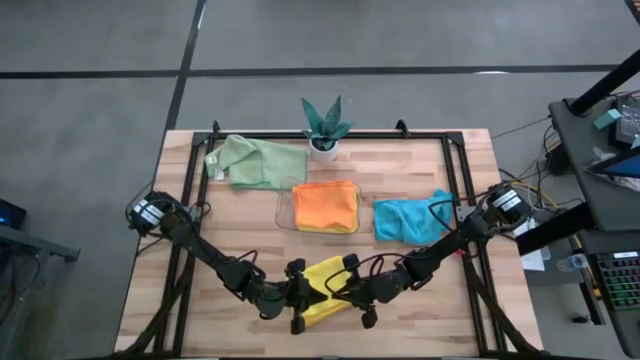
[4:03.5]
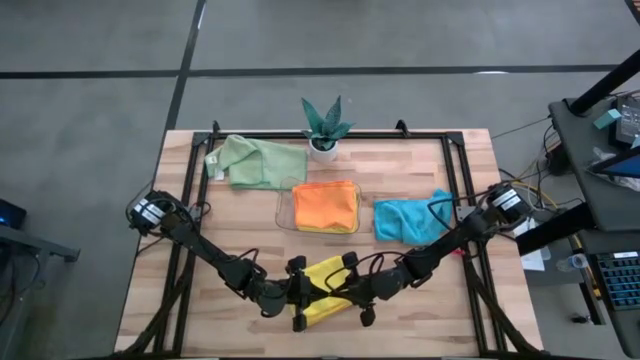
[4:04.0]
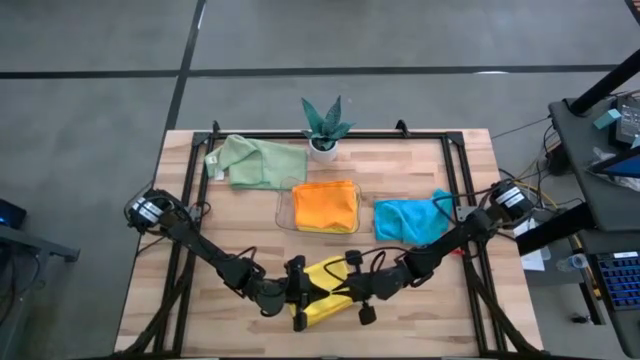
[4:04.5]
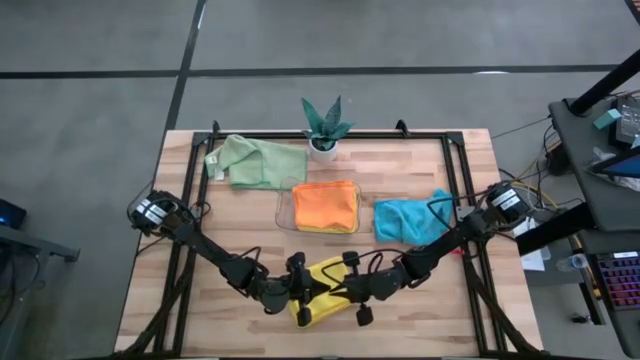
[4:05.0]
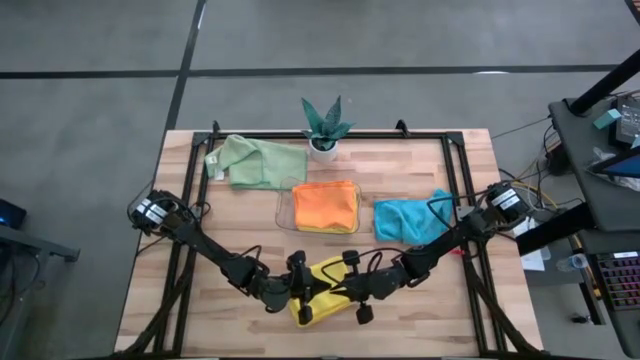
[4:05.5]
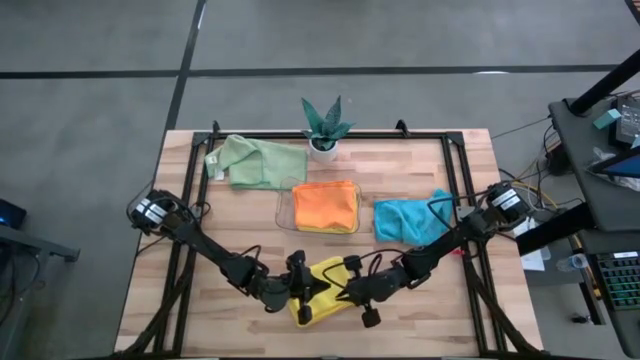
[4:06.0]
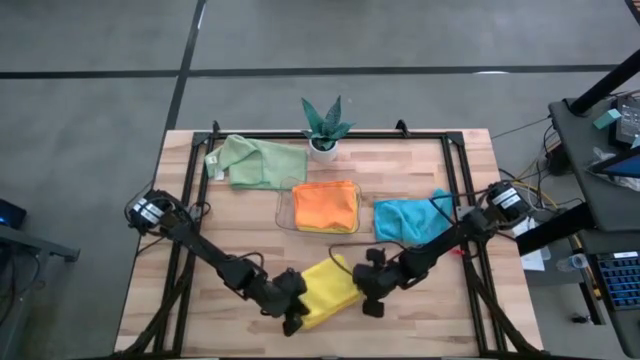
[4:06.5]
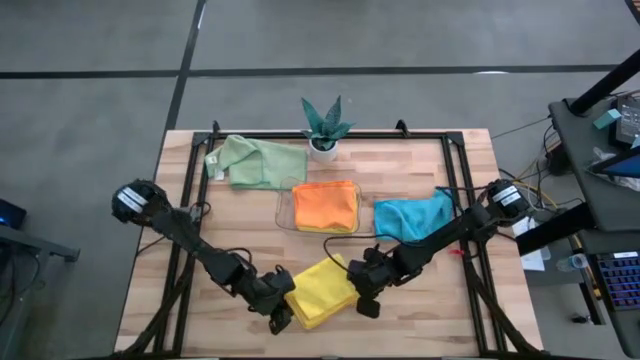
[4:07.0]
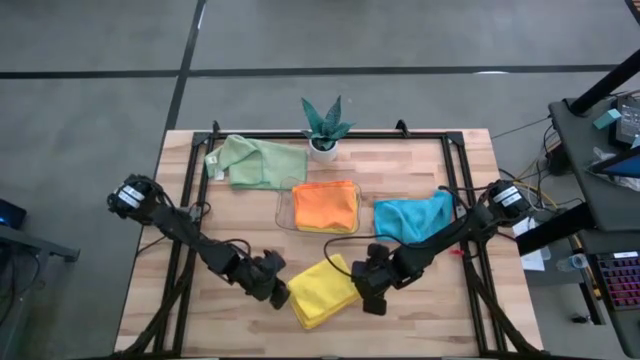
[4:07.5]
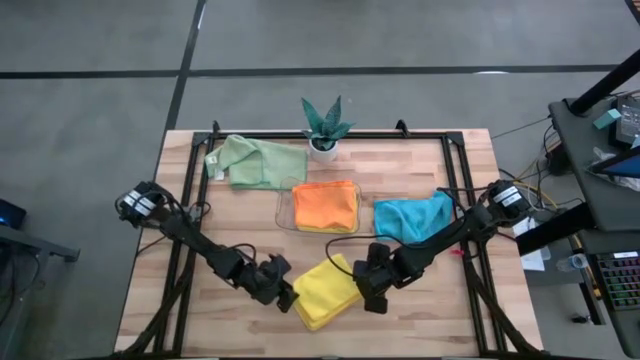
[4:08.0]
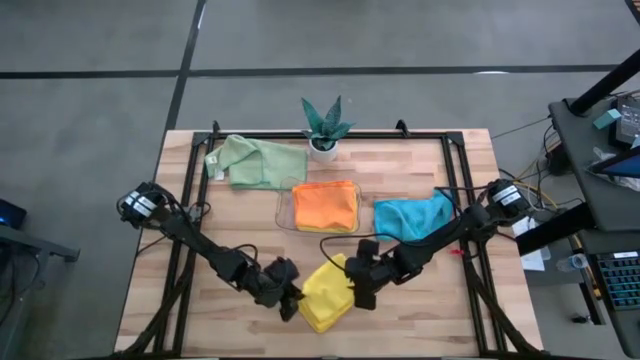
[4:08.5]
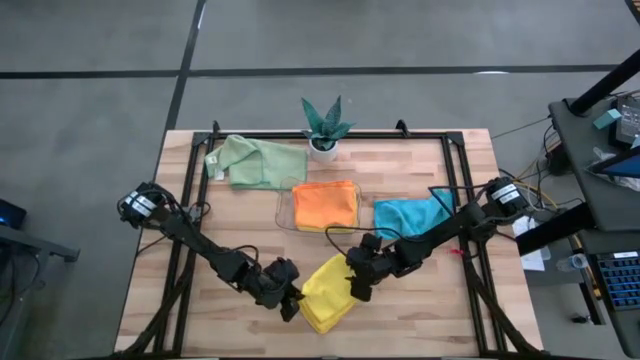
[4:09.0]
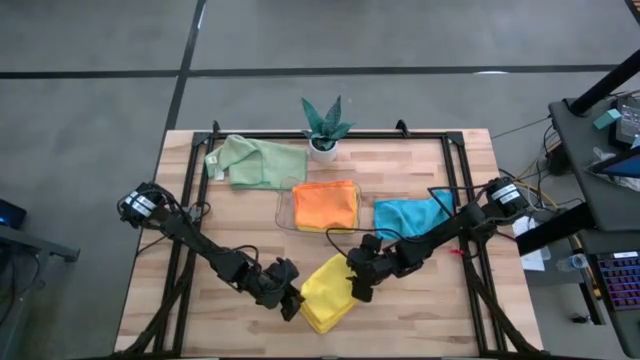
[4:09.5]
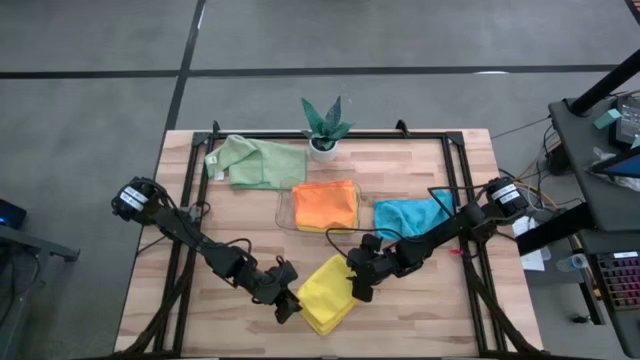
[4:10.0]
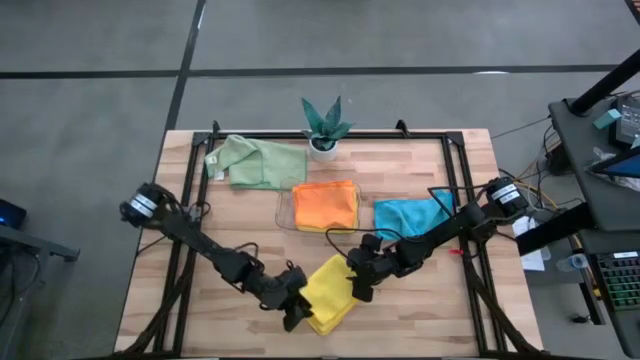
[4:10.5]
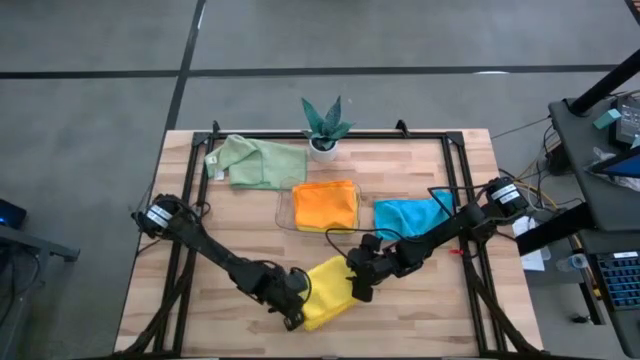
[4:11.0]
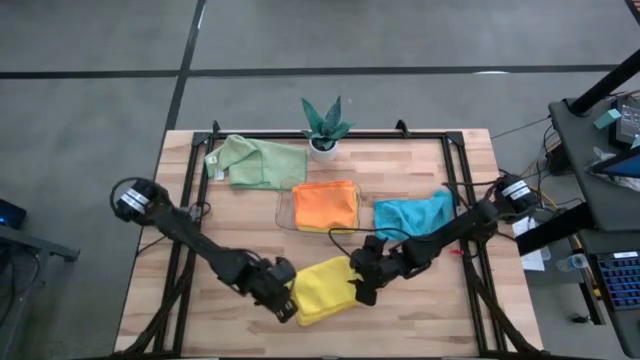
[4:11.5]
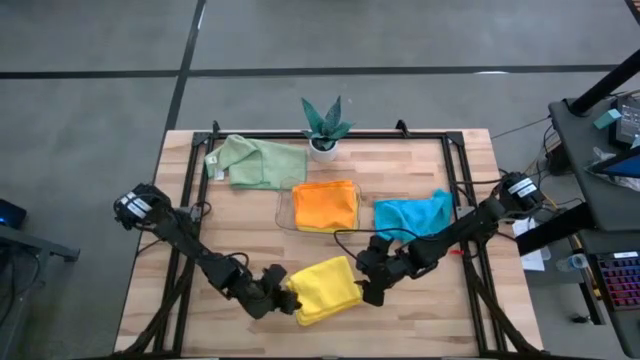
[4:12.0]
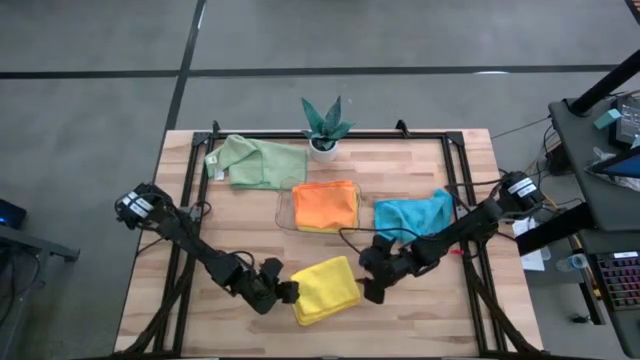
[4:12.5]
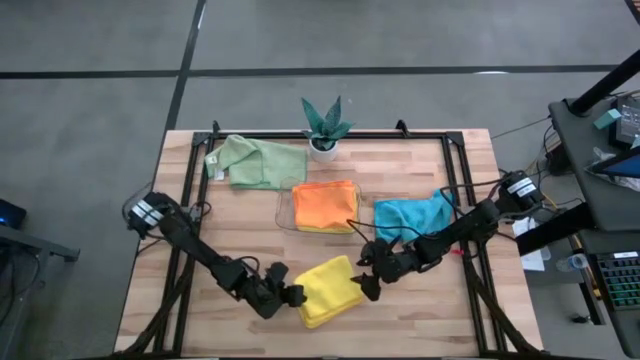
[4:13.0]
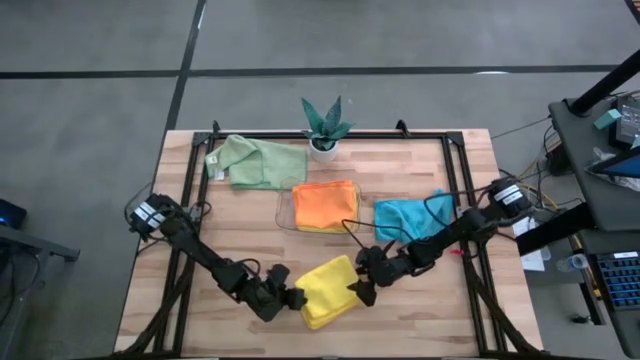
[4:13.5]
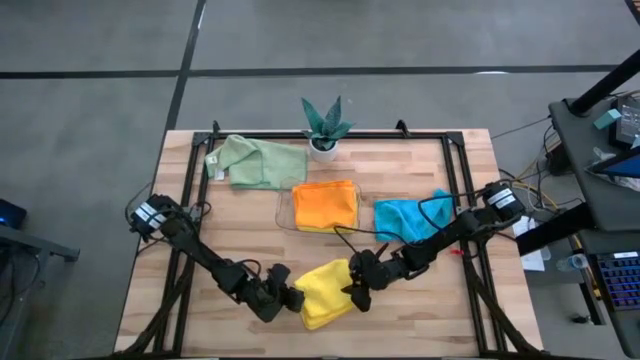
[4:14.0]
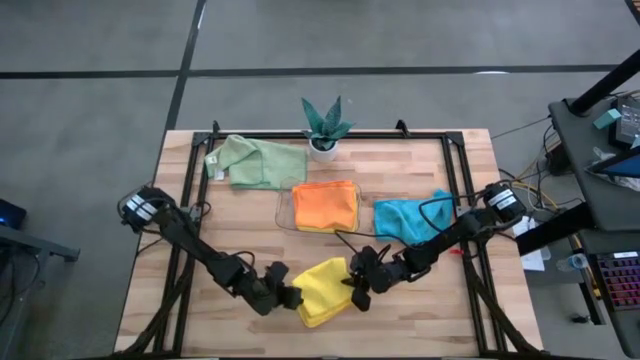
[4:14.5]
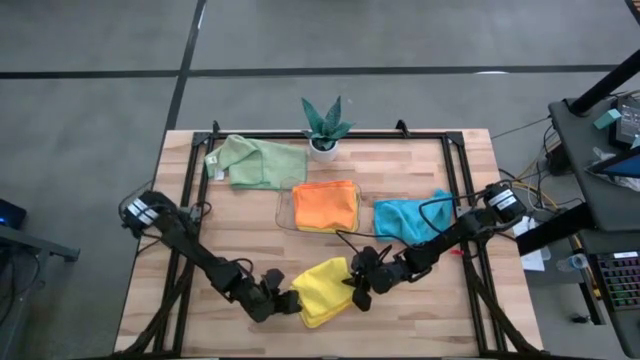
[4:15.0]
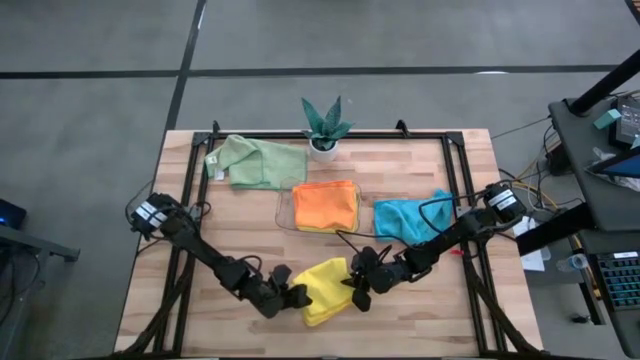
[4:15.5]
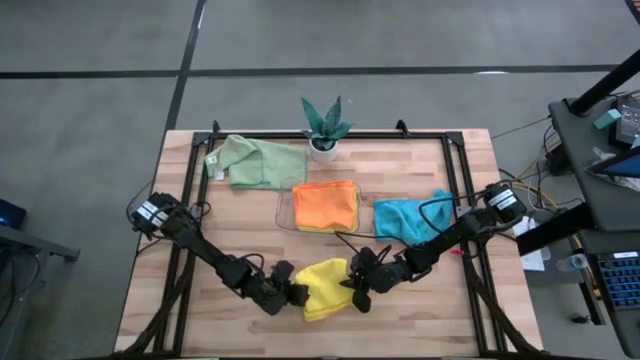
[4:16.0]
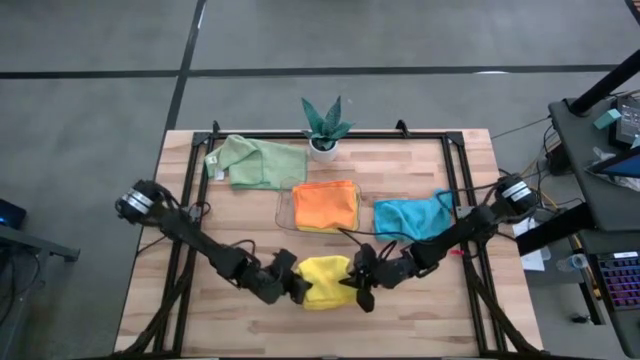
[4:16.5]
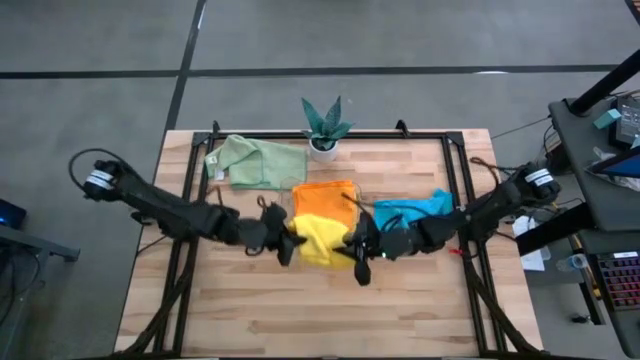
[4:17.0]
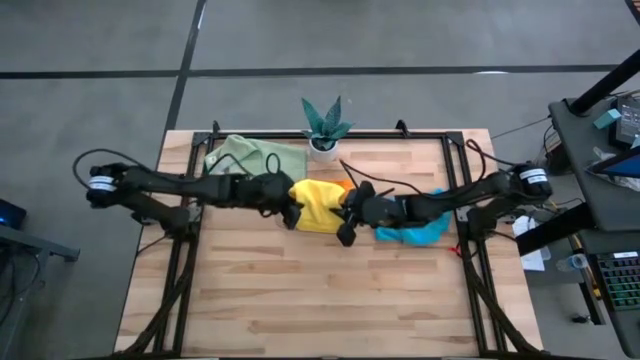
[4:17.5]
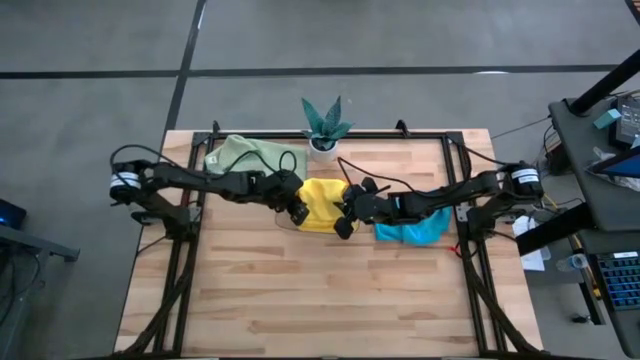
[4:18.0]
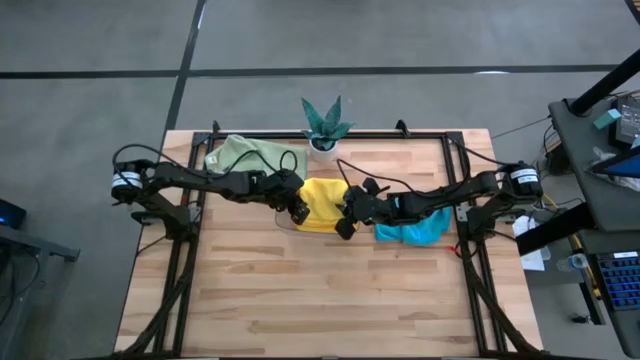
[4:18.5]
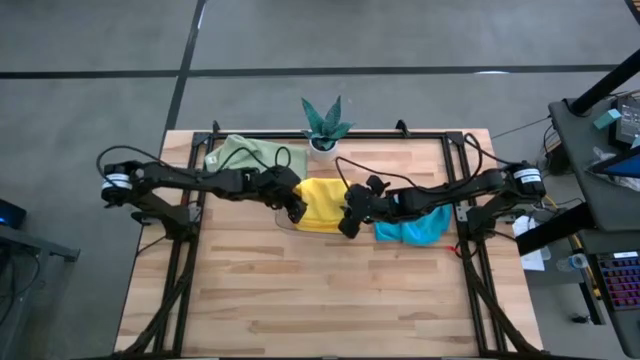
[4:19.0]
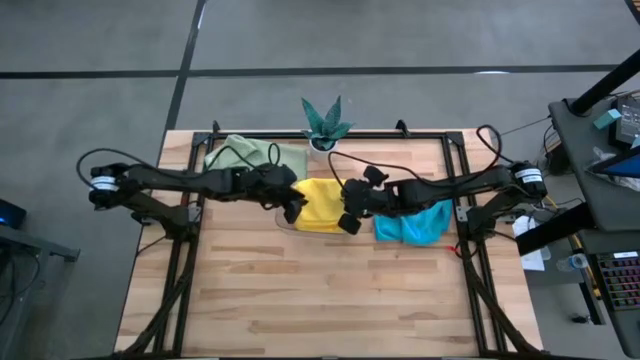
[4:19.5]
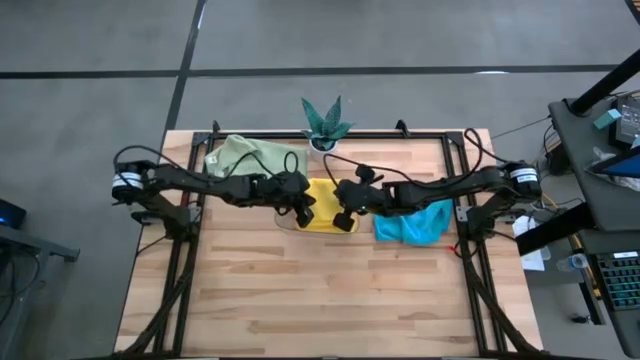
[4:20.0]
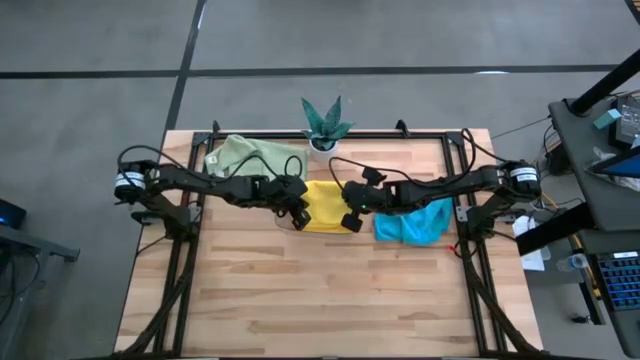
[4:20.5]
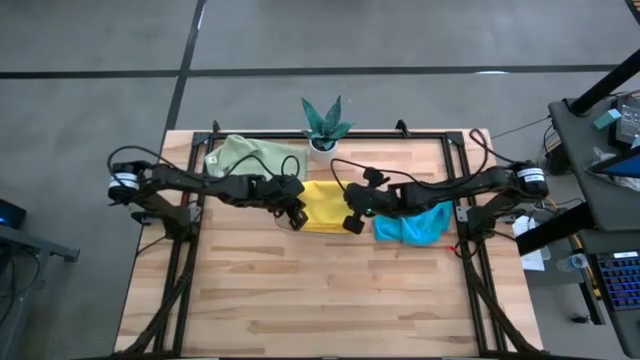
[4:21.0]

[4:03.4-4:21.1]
Task: Fold microfiber towels
Put the folded yellow microfiber towel into the transparent bin
